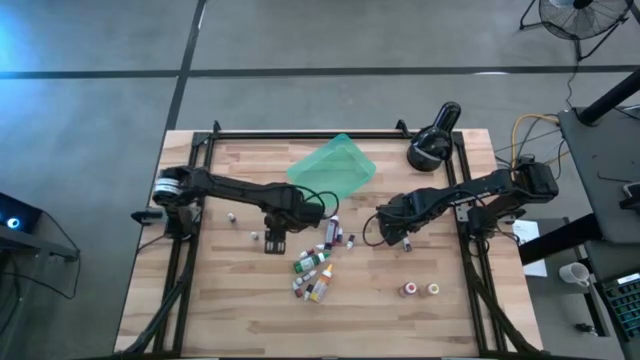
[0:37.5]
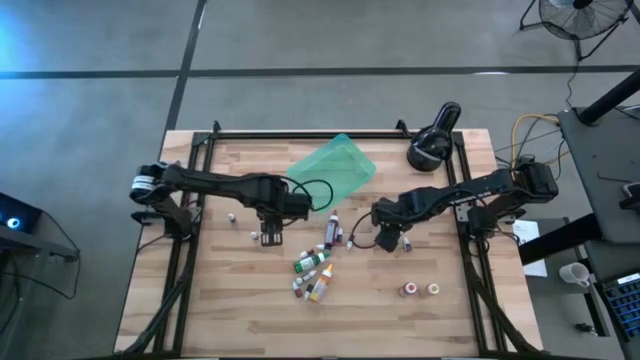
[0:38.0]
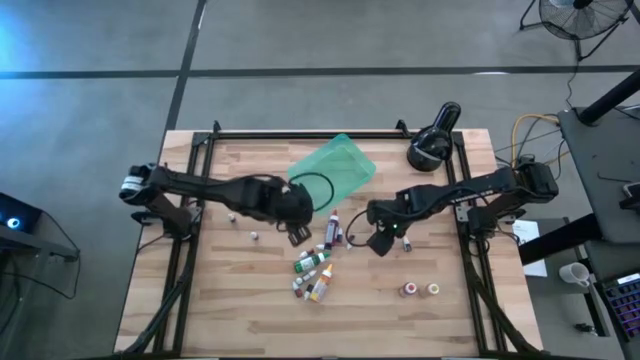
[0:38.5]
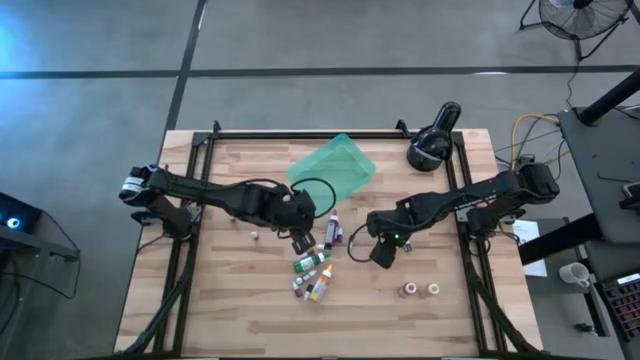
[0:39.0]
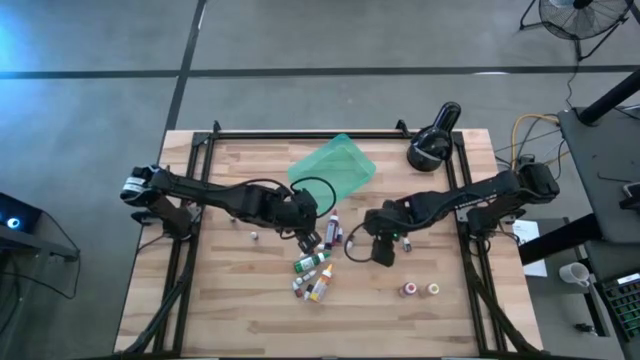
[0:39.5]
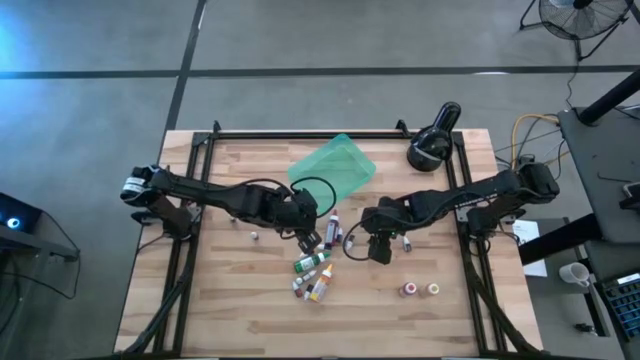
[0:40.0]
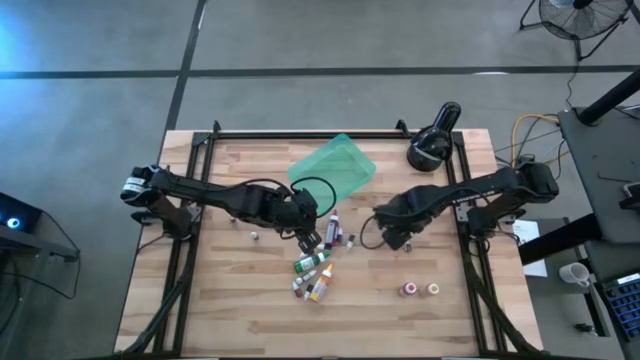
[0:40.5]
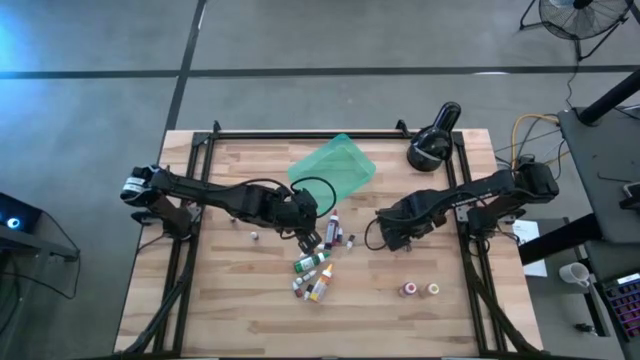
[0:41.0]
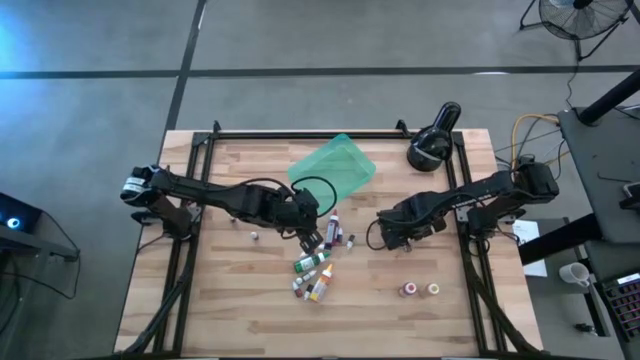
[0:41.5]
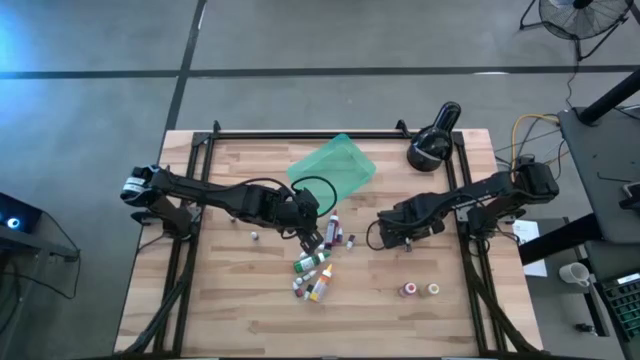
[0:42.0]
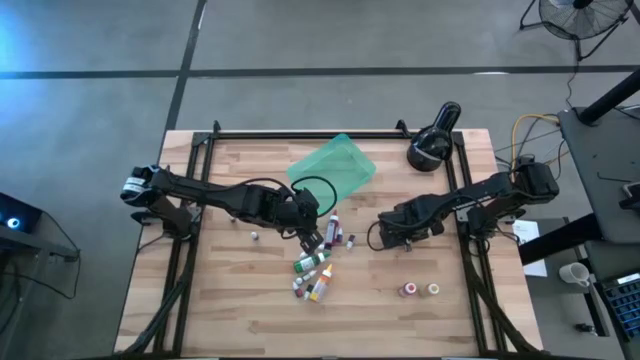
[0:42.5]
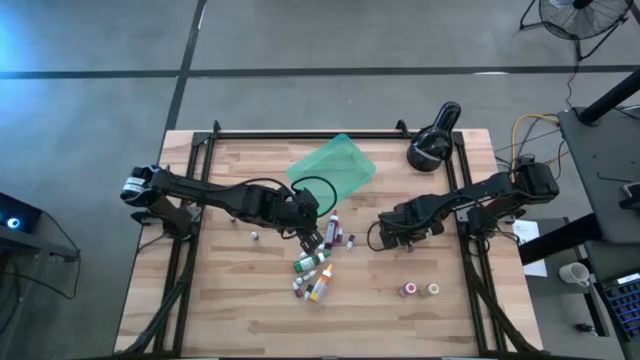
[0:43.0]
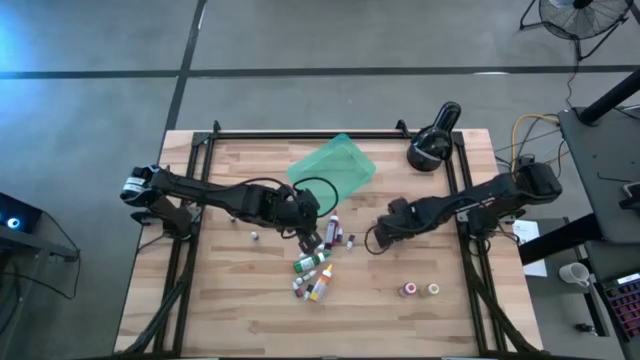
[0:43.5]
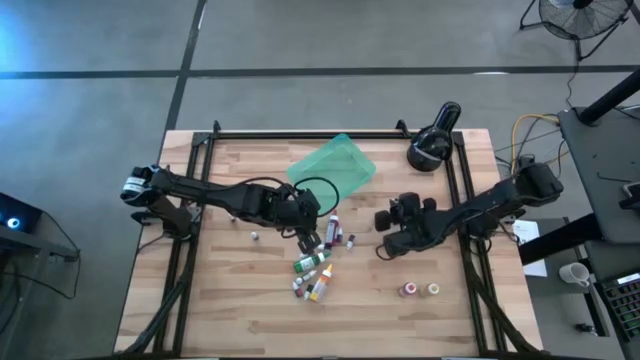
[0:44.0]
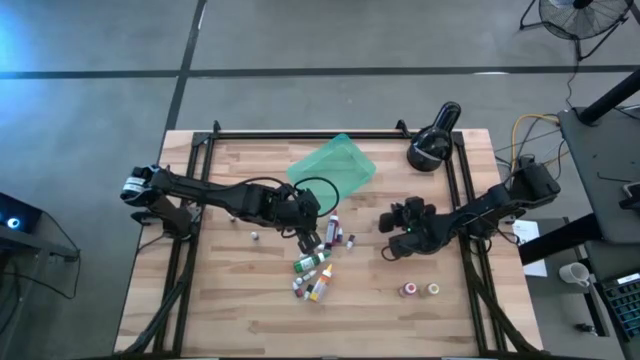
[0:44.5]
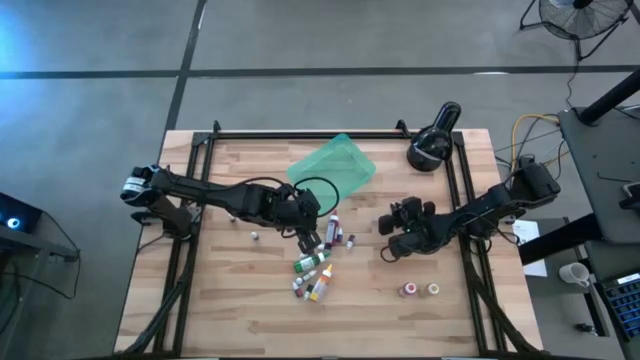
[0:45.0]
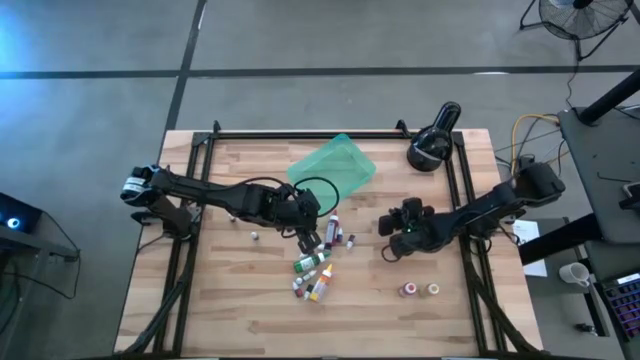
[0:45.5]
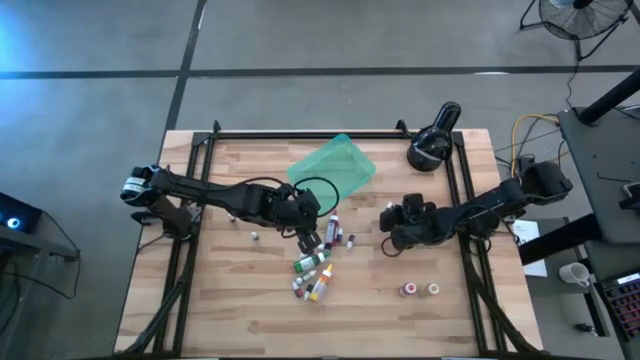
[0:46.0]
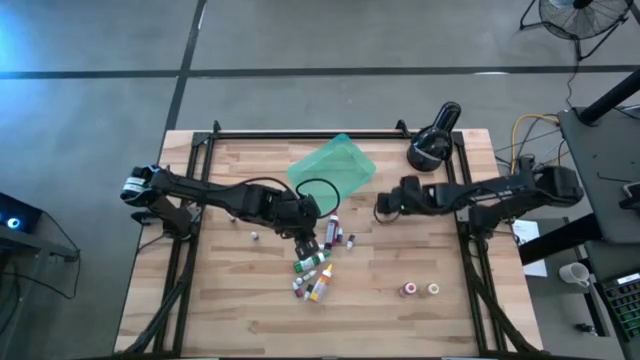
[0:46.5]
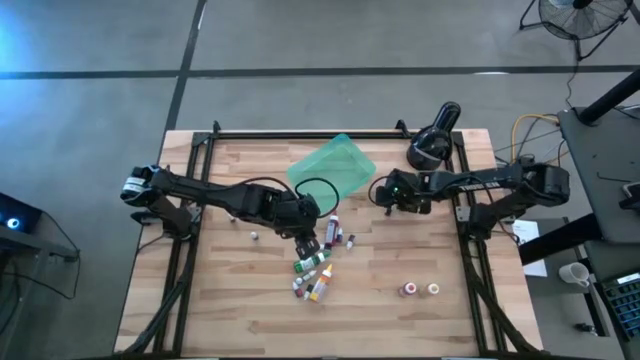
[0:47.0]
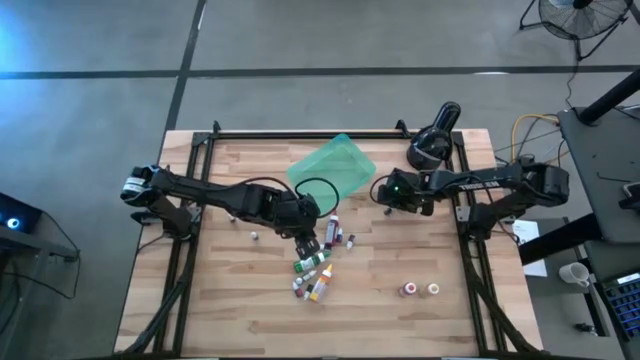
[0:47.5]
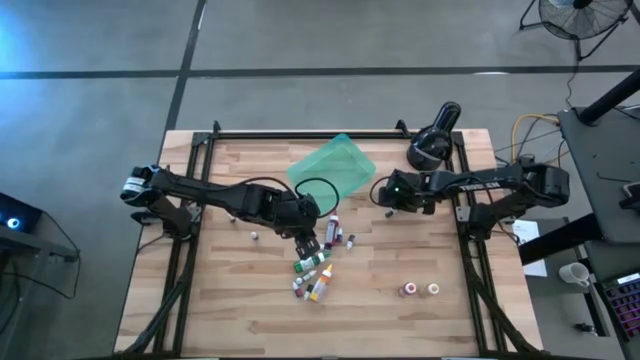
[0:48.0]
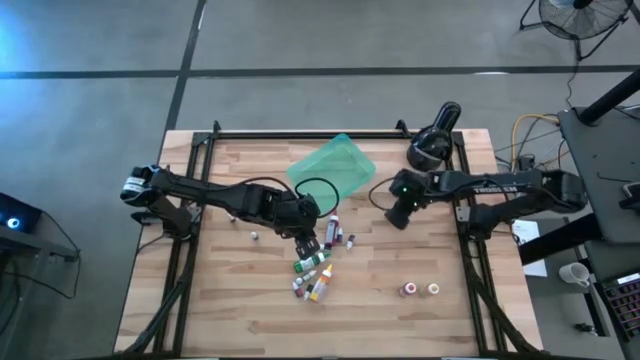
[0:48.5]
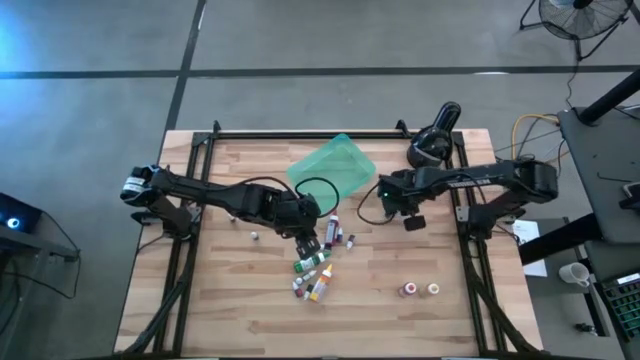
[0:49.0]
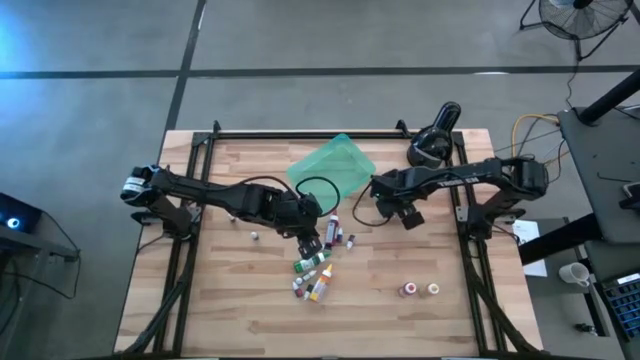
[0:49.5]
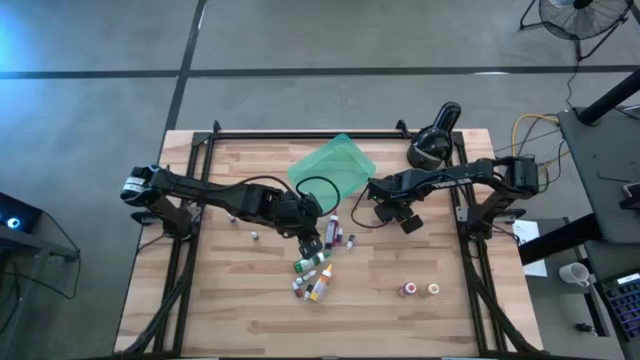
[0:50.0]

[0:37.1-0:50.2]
Task: Pick & Place food coloring
Adjust the green small food coloring bottle

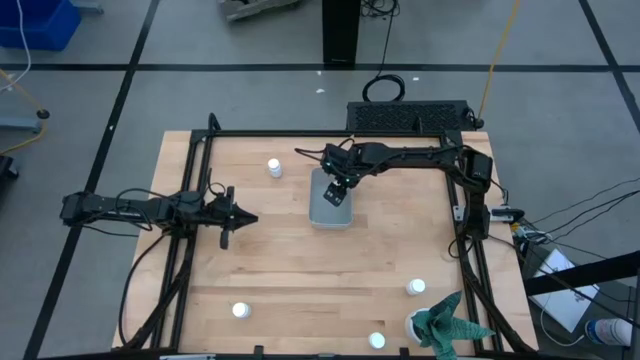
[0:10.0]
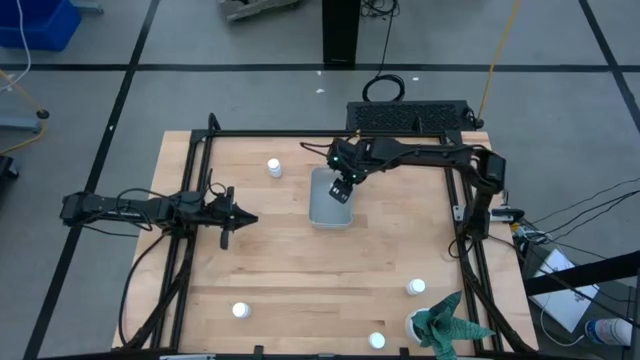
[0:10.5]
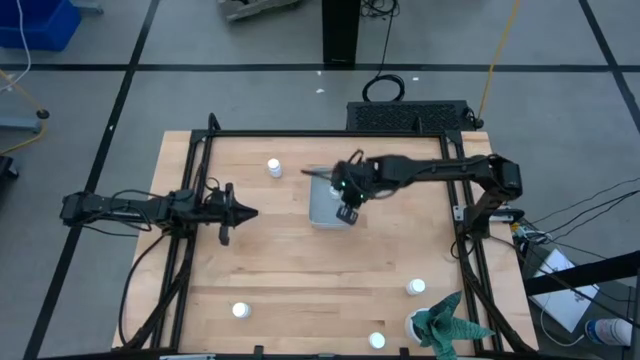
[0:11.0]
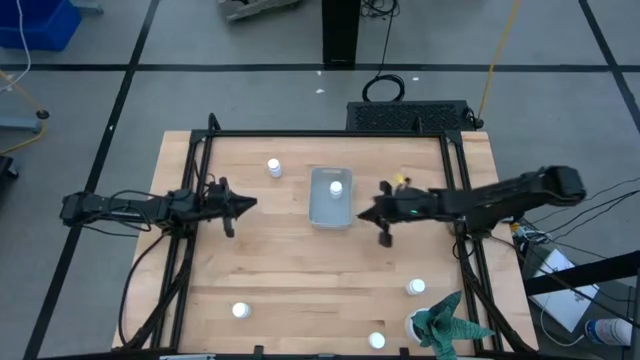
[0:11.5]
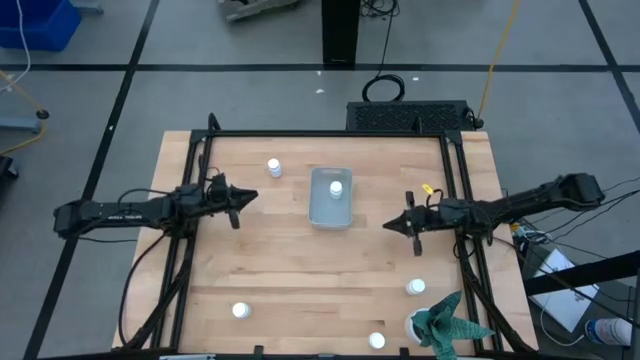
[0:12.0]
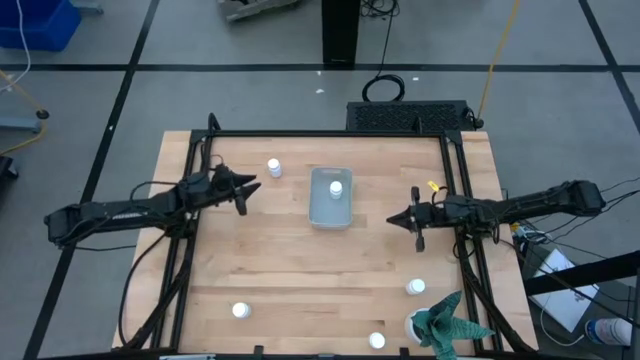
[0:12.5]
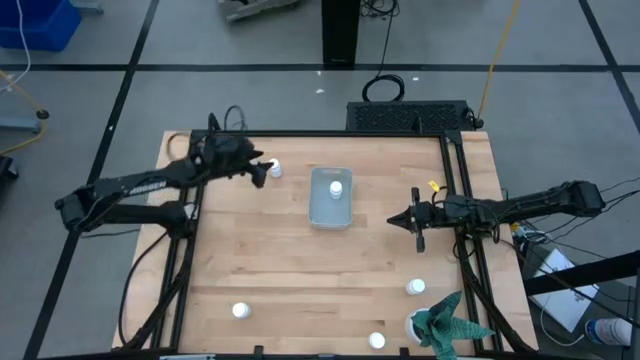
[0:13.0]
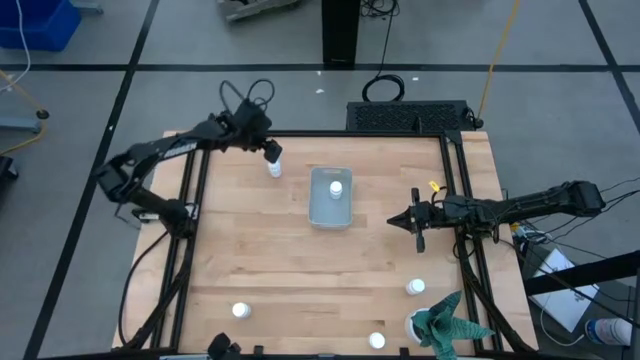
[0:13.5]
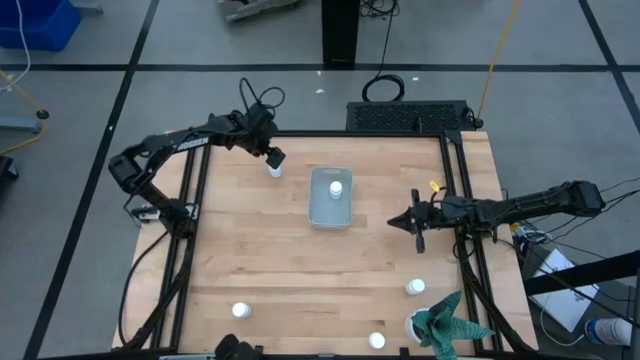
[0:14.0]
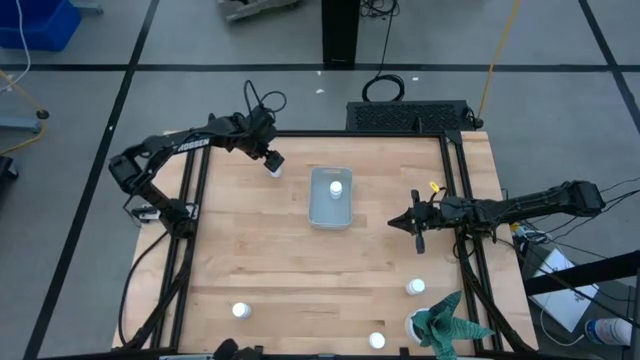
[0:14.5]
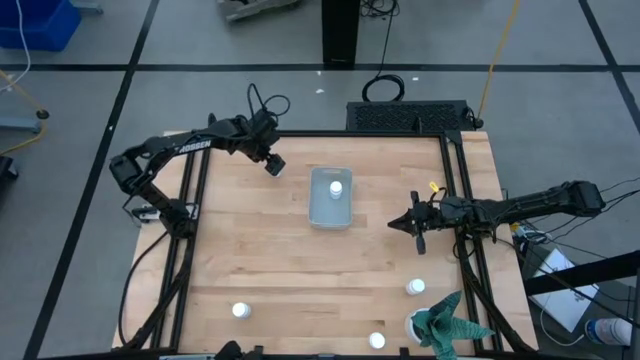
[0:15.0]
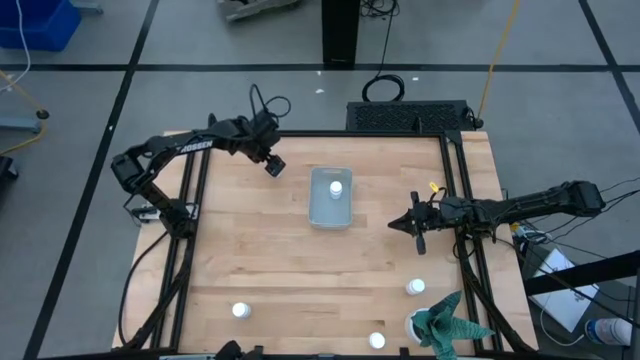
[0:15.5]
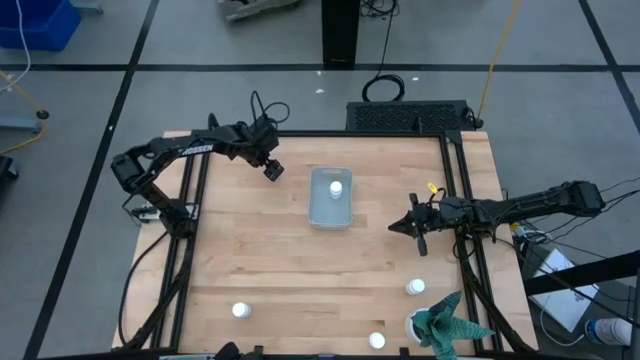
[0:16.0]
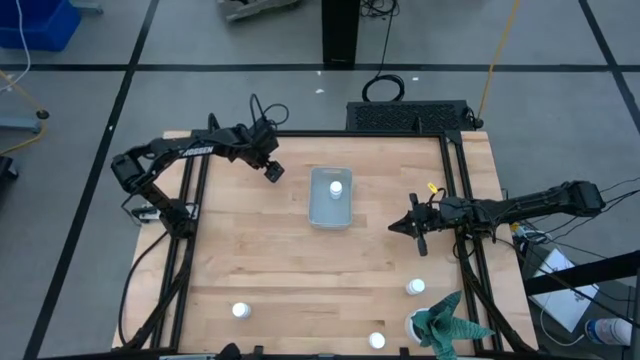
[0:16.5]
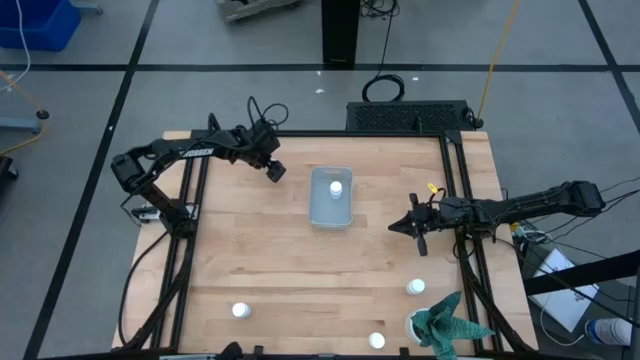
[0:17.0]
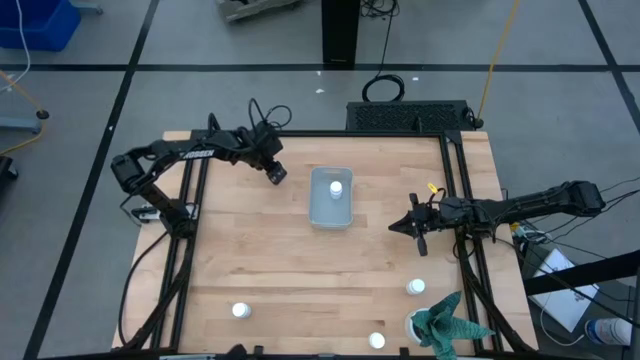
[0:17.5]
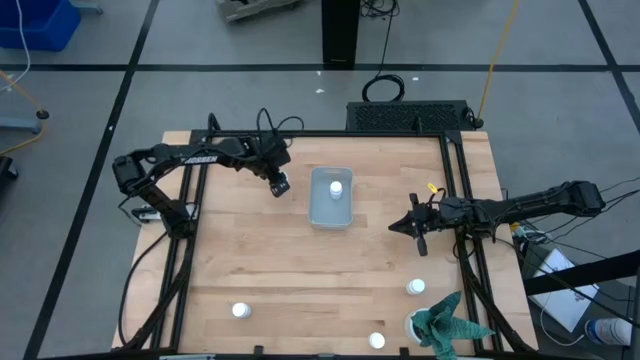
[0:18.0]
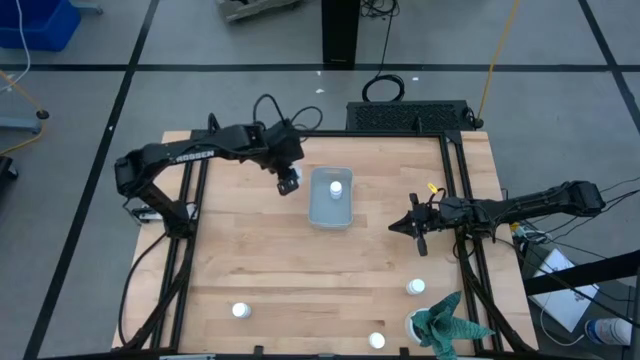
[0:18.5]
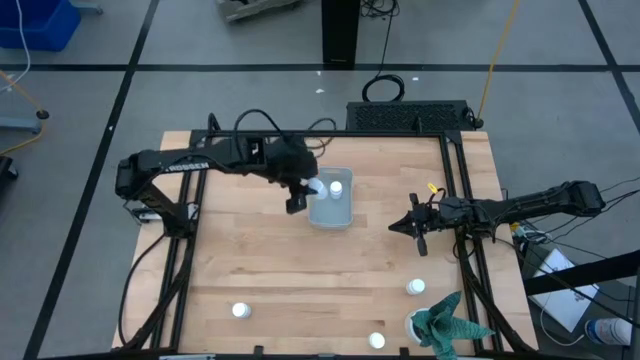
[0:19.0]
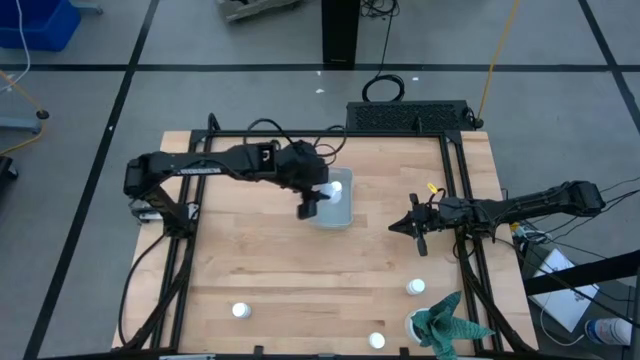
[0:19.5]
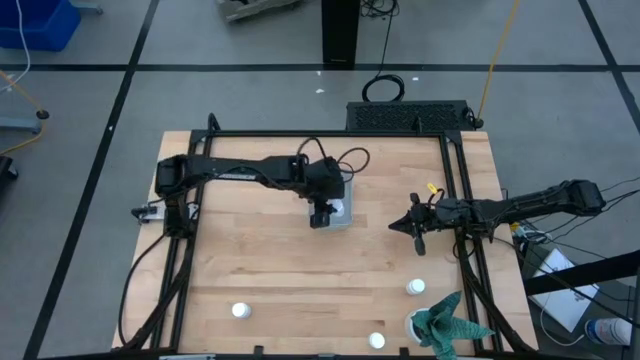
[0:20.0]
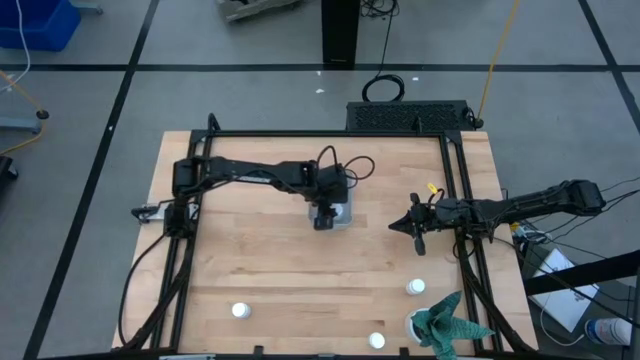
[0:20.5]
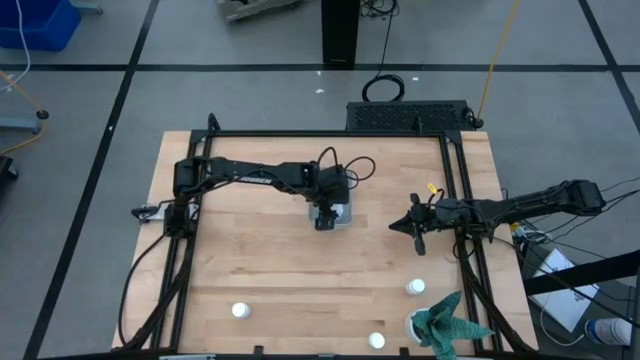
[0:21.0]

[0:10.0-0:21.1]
Task: Pick and place pill bottles into a basket
Put the white pill bottle into the gray bin
